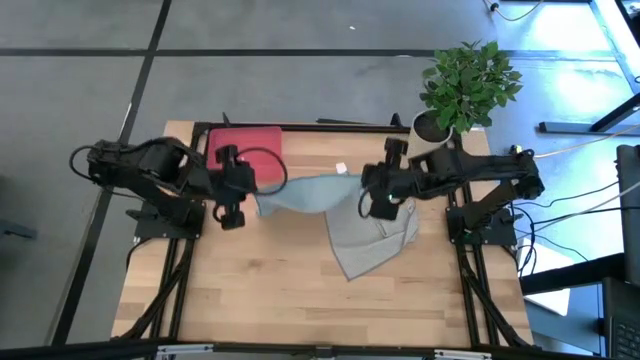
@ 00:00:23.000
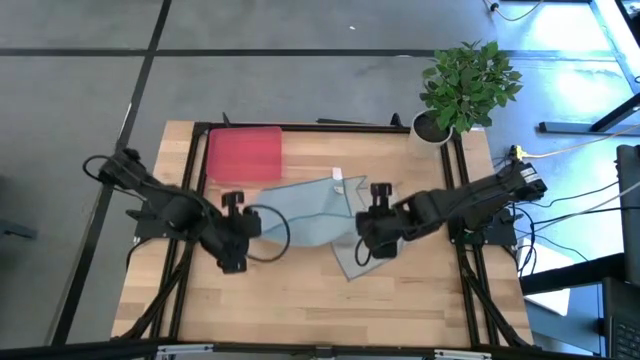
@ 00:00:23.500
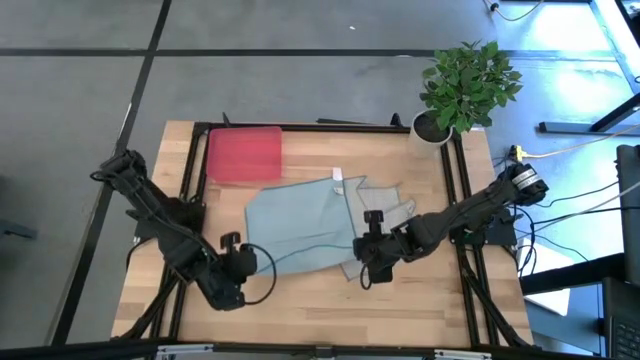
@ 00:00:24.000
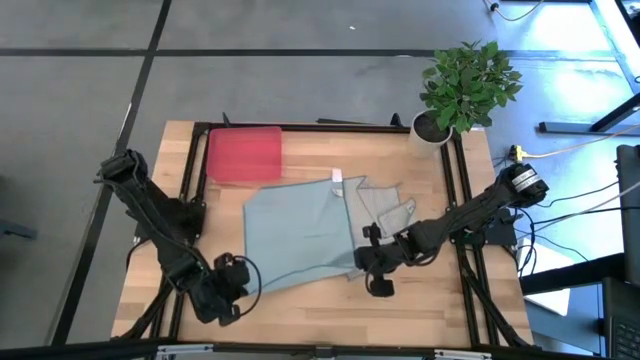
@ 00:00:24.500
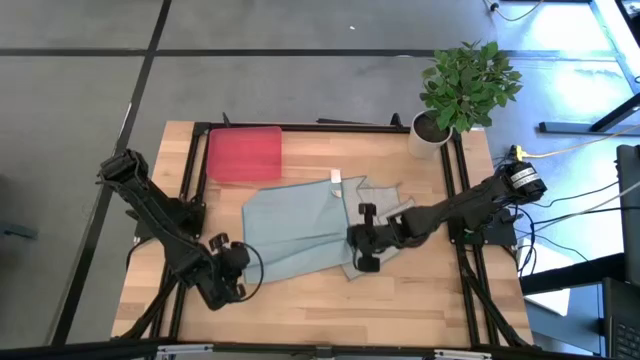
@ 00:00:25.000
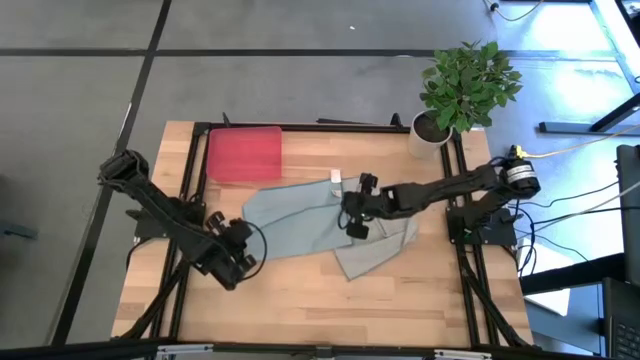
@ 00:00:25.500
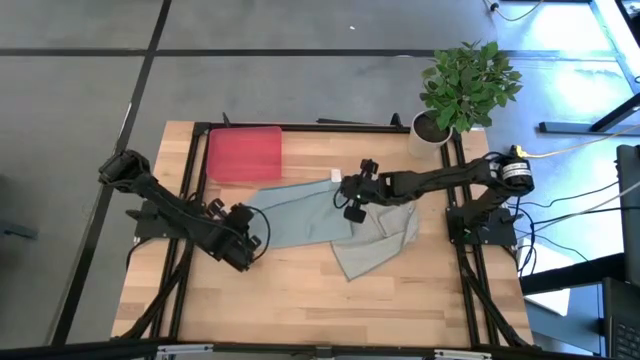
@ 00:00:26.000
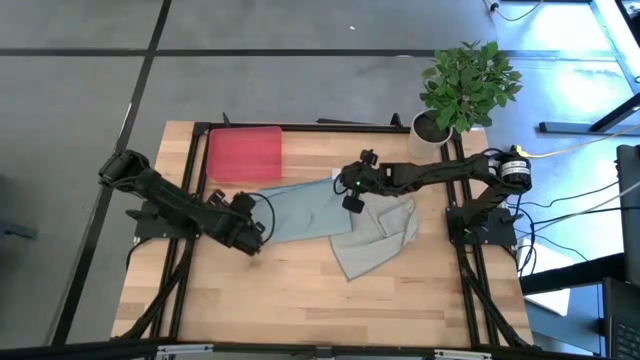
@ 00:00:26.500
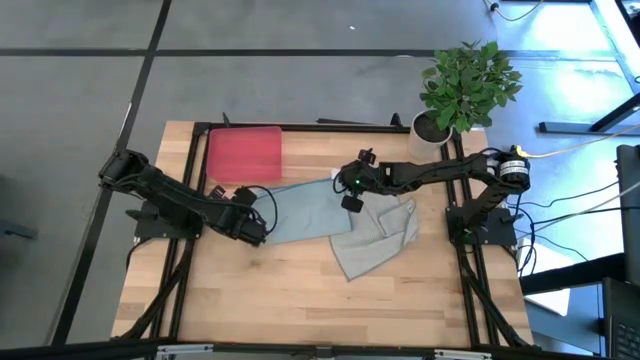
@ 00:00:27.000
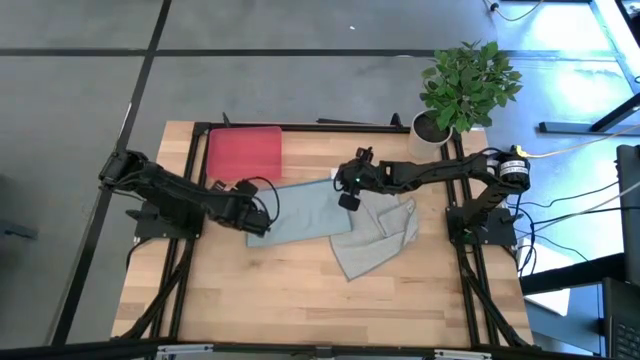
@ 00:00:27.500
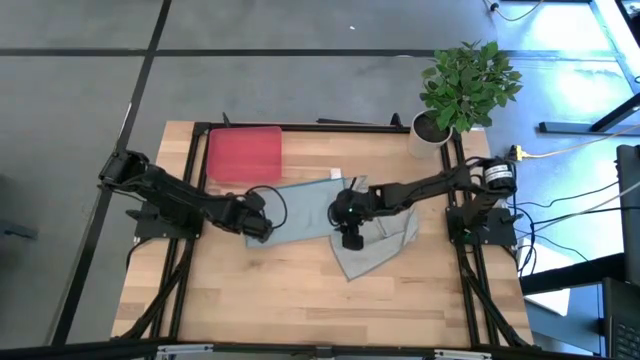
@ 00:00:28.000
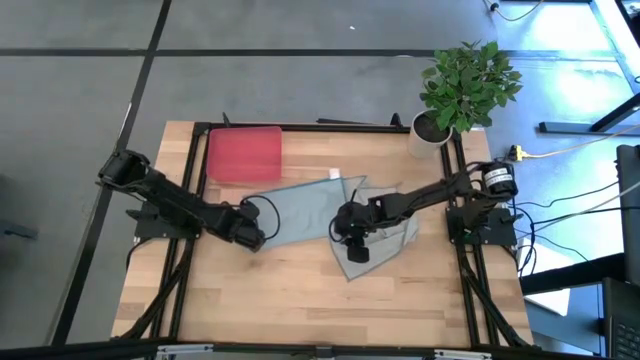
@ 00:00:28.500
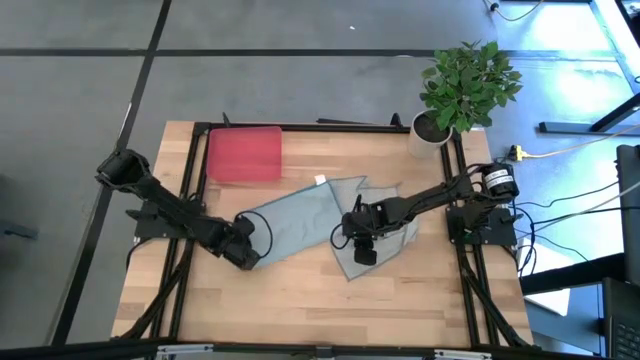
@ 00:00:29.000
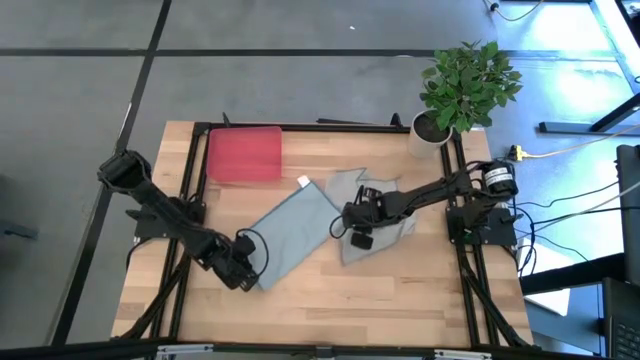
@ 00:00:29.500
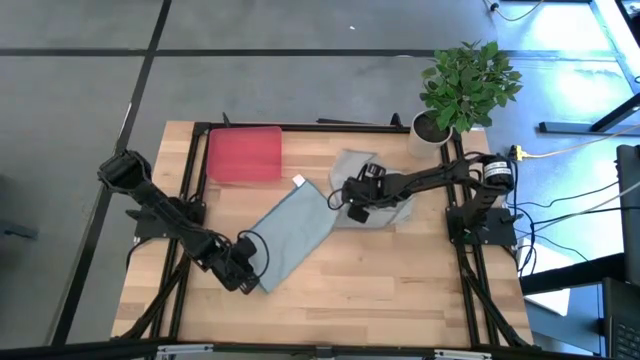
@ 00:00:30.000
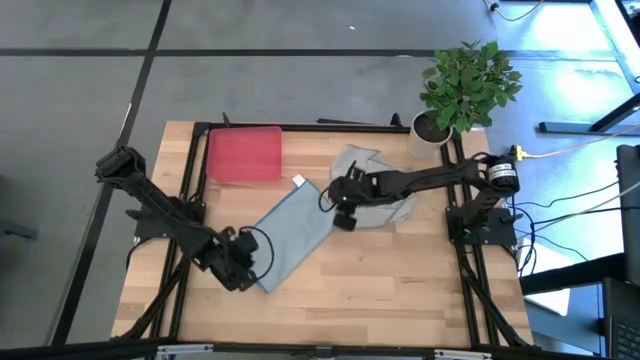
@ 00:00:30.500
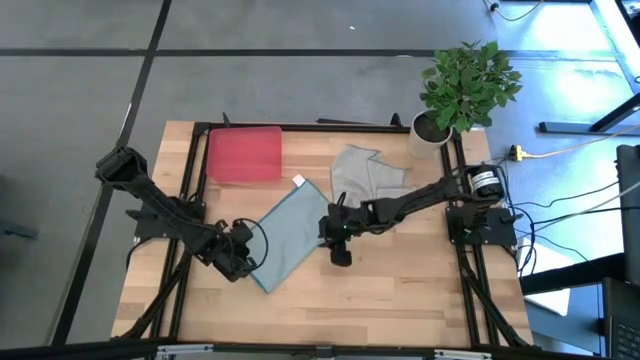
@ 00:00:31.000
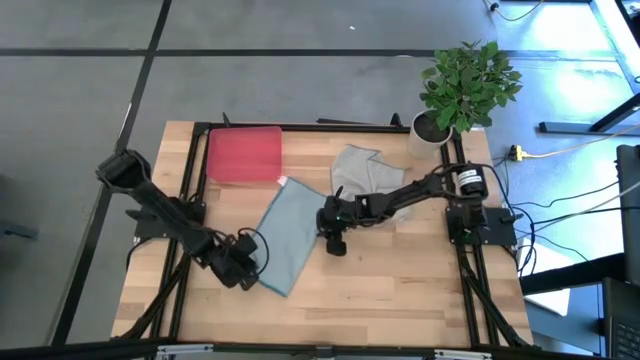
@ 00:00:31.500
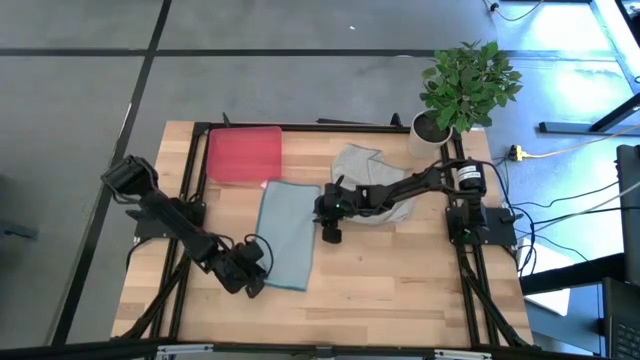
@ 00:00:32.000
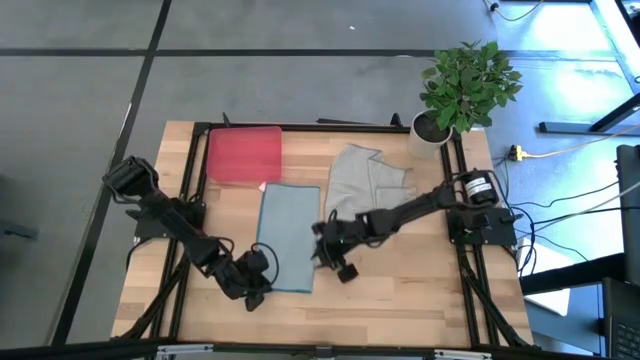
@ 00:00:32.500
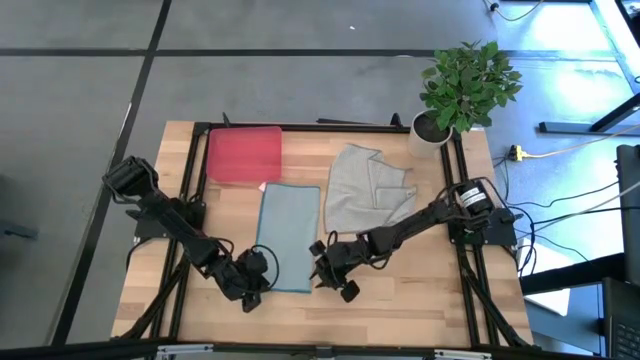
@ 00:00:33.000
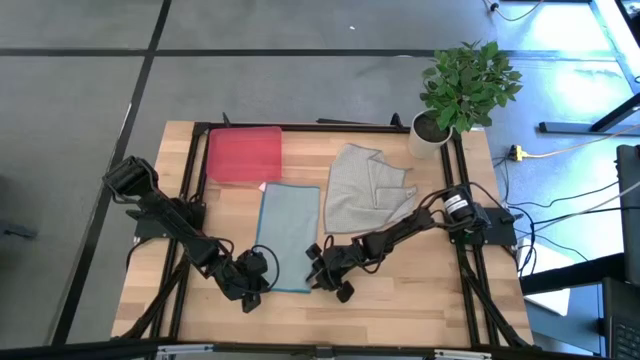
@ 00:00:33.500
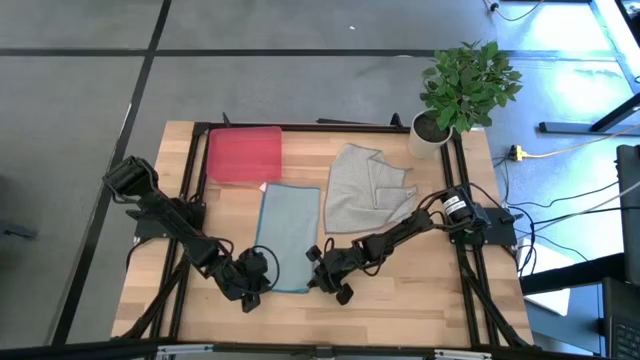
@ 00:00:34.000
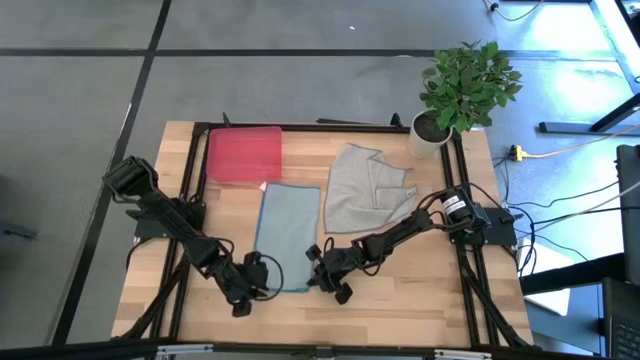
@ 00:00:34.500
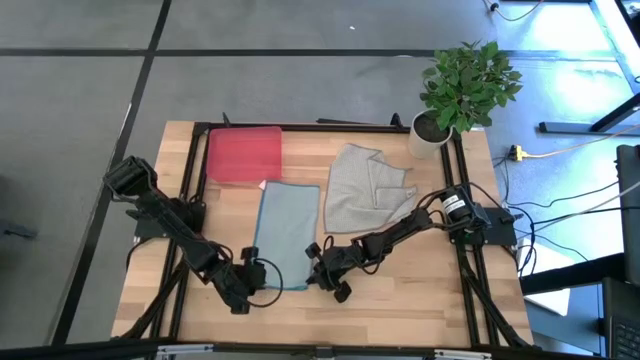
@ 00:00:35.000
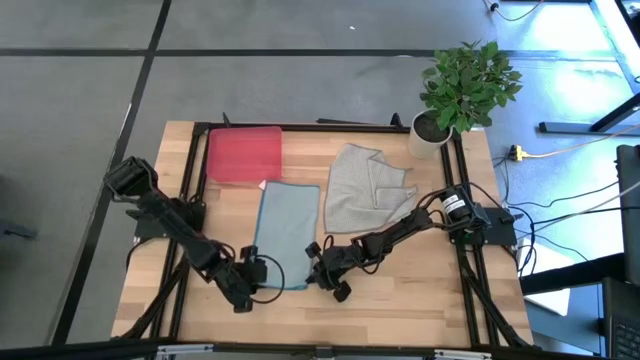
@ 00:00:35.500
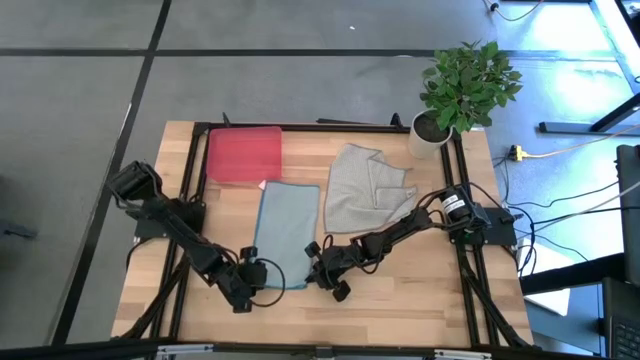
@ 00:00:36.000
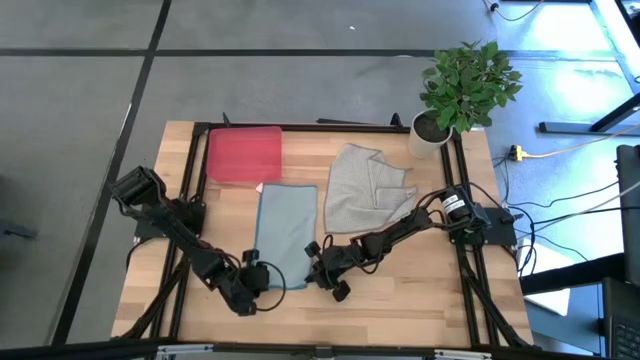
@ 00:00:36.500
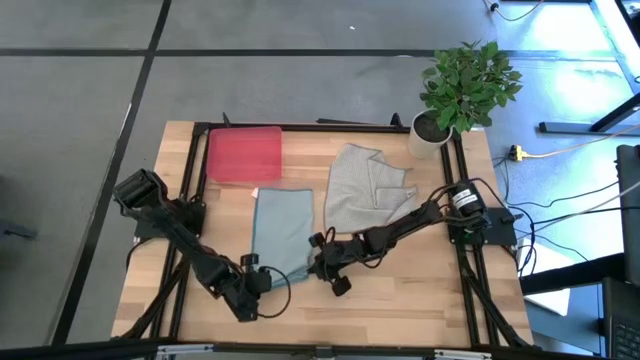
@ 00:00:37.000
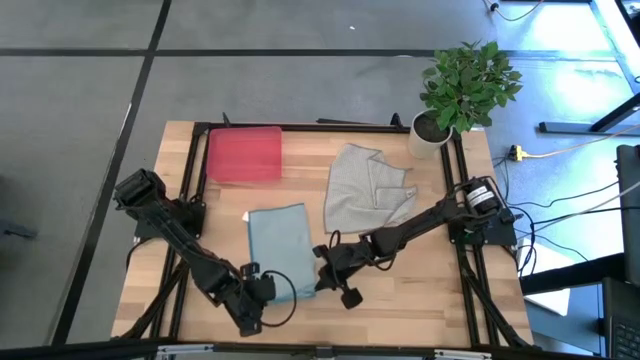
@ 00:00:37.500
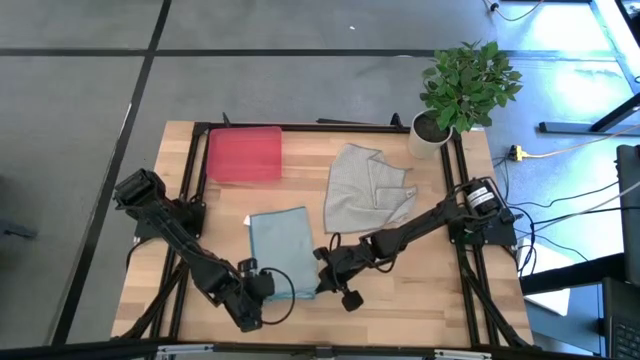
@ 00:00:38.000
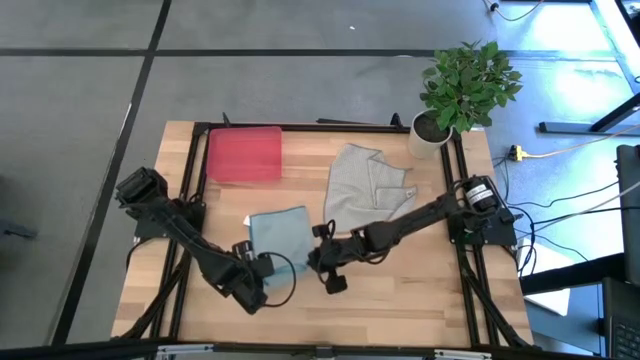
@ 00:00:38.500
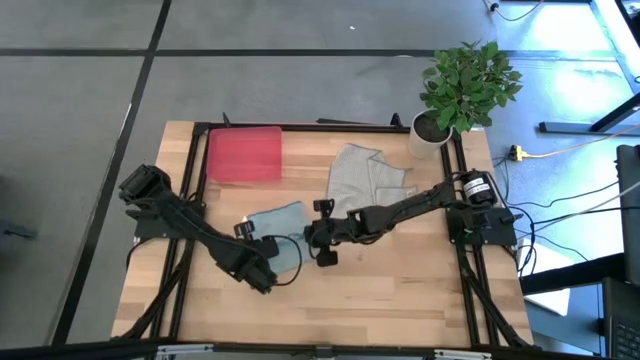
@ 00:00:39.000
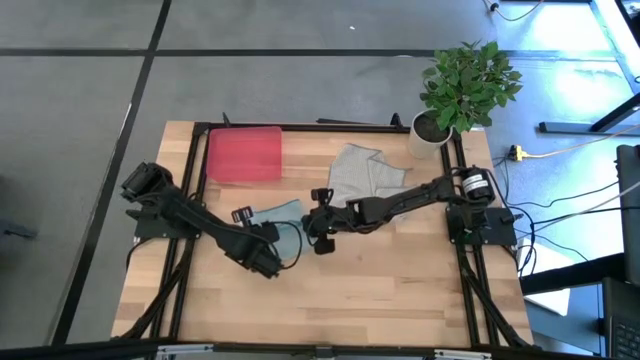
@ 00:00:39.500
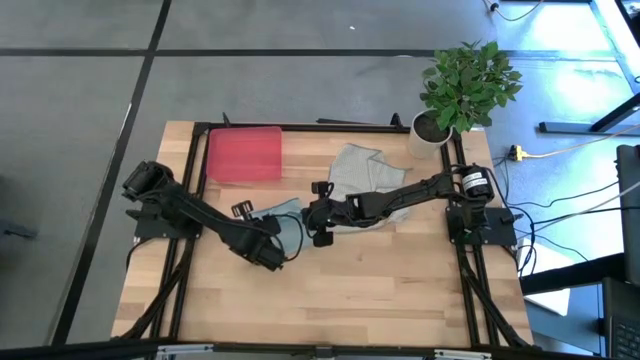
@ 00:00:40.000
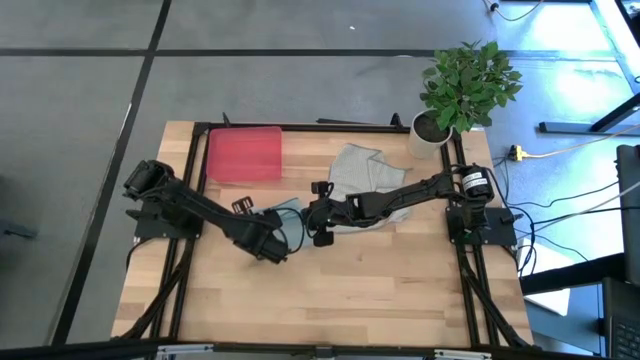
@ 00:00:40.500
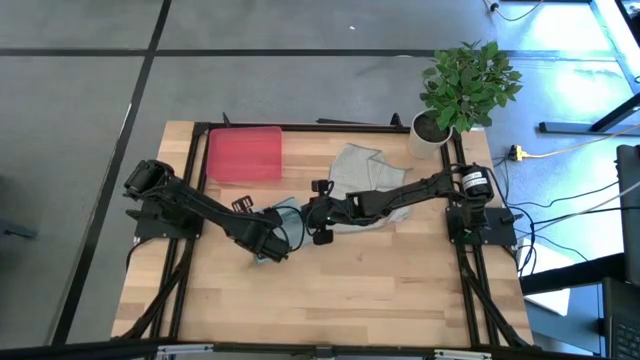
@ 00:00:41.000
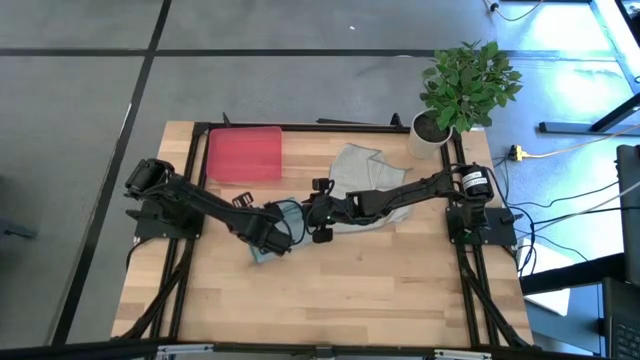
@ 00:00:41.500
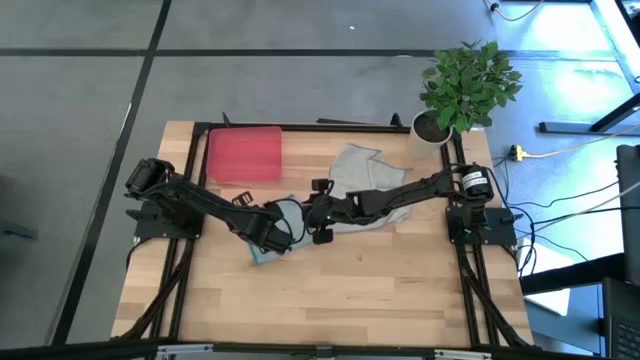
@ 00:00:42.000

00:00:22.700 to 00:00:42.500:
Task: Roll microfiber towels into tight, uniform cylinder then place into a basket
Fold the blue towel
